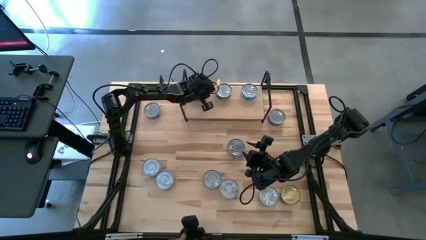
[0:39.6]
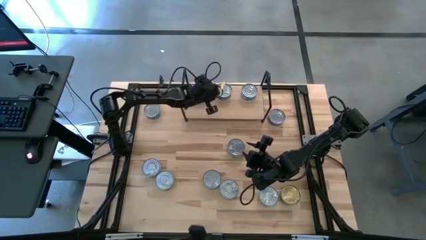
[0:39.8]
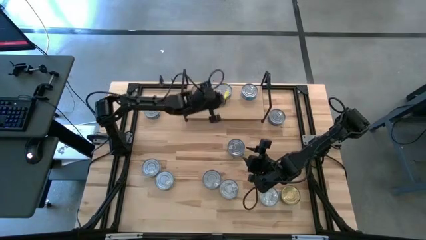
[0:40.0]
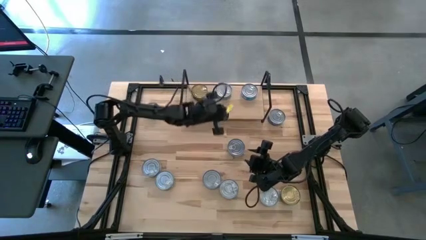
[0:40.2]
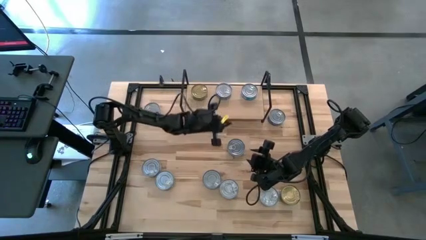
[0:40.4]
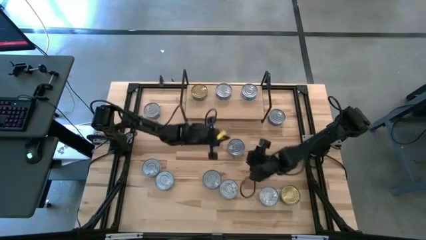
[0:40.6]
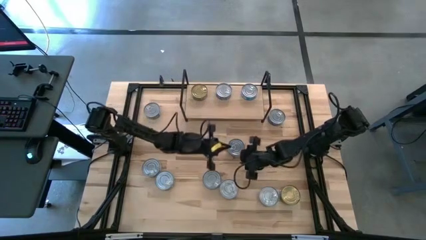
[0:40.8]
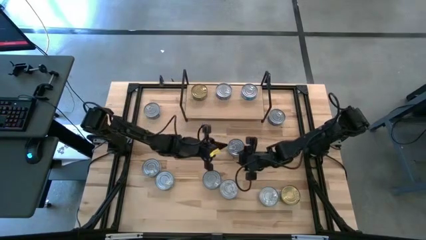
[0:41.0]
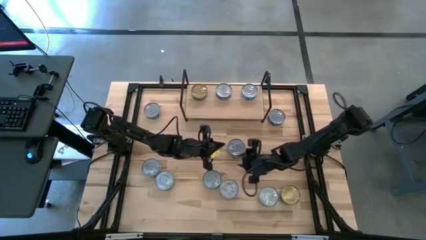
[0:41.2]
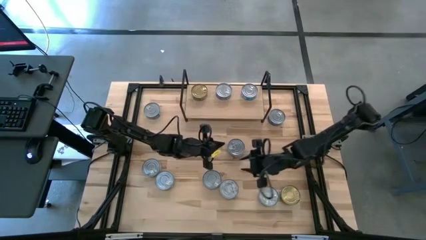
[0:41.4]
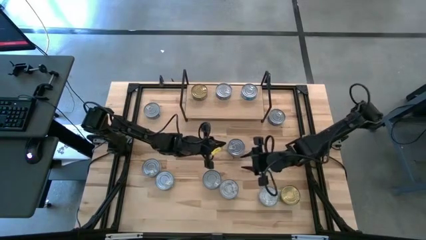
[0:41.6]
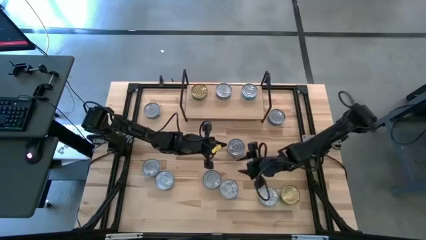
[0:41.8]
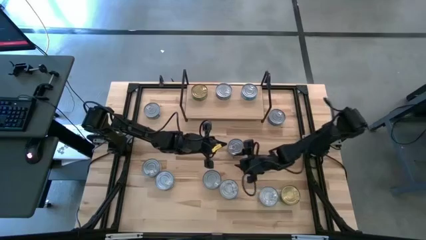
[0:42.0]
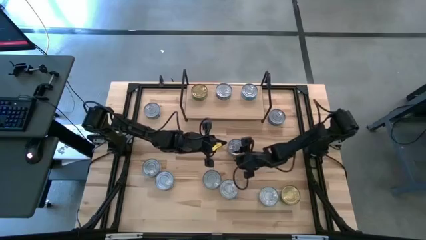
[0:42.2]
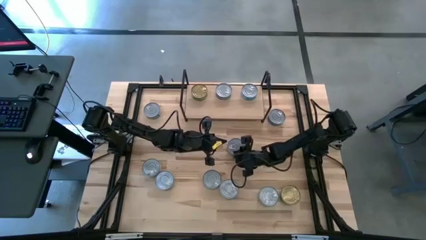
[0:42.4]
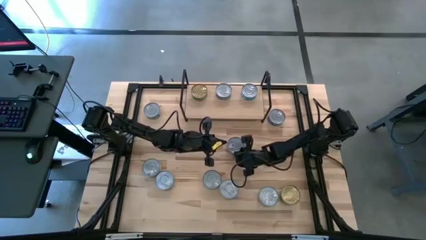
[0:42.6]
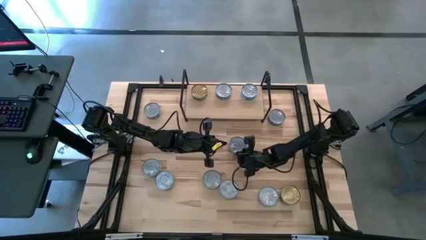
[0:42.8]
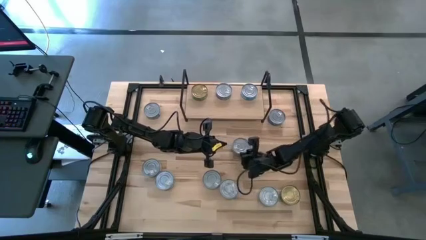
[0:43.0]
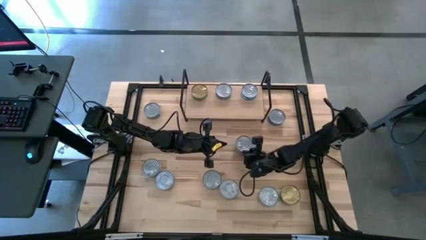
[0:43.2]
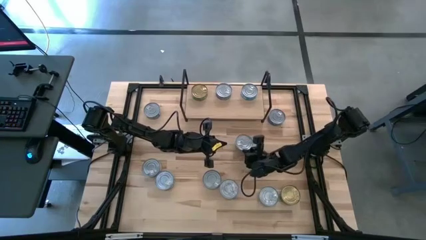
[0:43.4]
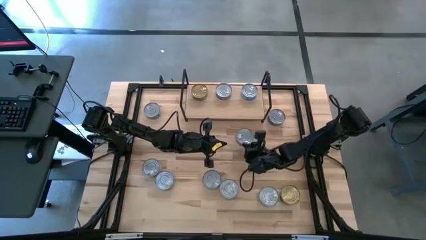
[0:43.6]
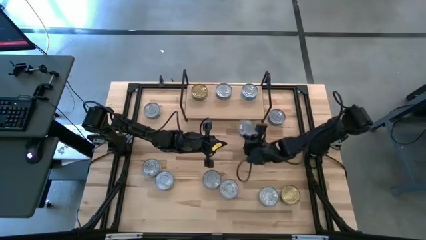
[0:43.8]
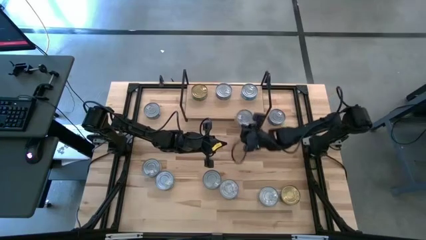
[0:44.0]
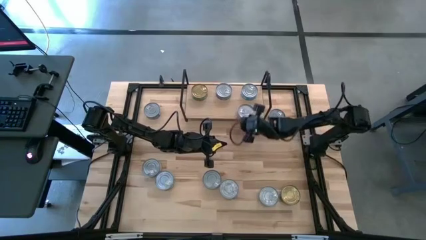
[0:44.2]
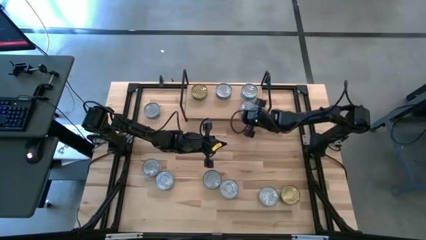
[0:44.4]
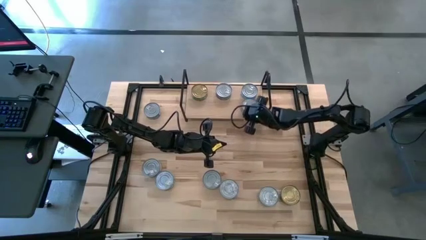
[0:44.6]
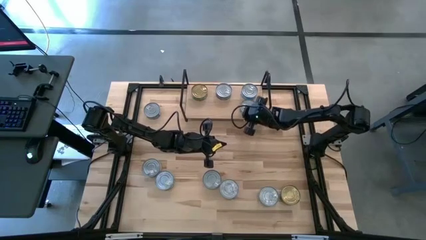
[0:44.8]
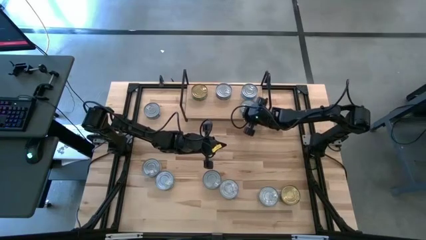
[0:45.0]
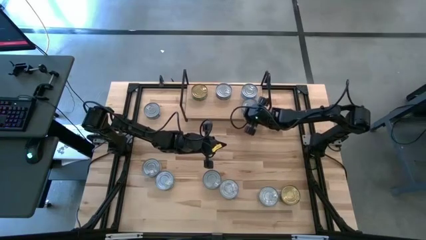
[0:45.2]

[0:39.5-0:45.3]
Task: Stack canned seafood by type on shelf
Put the yellow-blue tuna can on the shelf

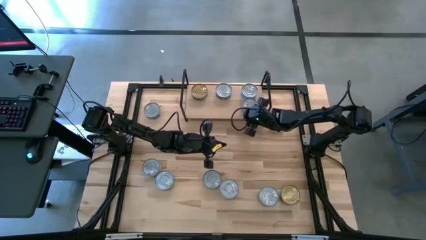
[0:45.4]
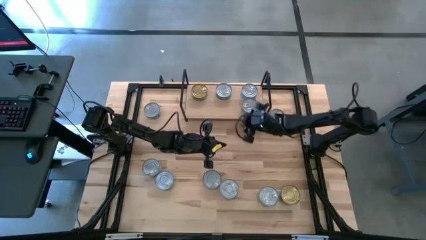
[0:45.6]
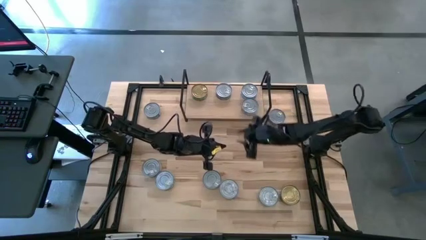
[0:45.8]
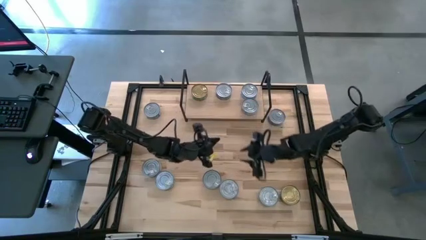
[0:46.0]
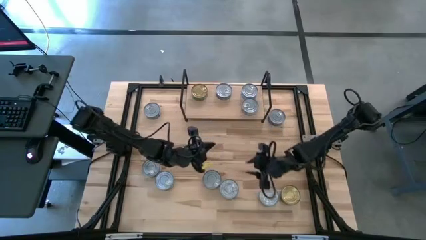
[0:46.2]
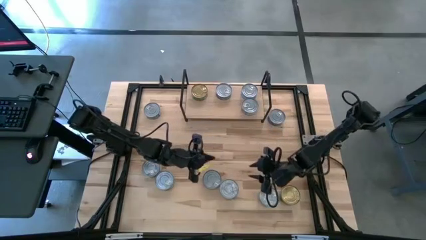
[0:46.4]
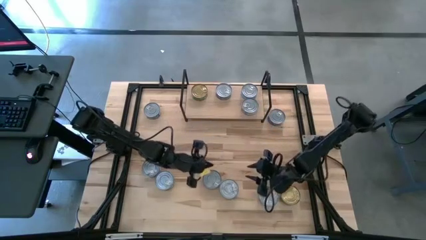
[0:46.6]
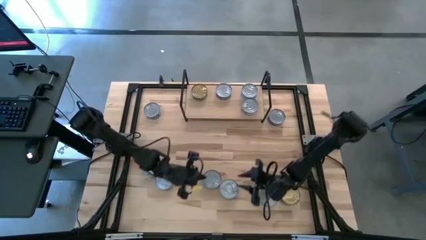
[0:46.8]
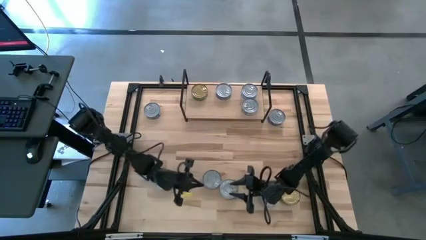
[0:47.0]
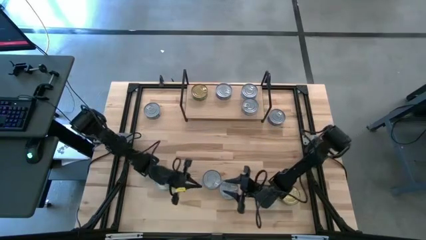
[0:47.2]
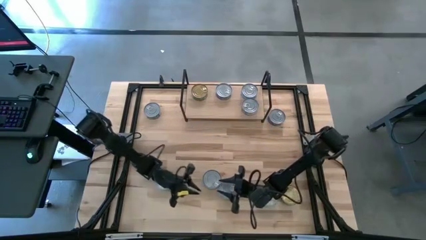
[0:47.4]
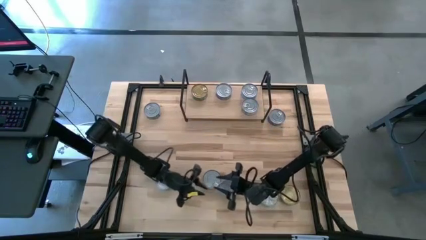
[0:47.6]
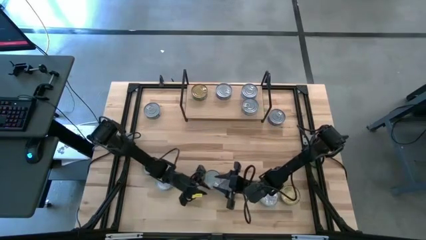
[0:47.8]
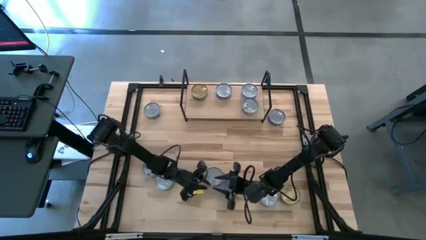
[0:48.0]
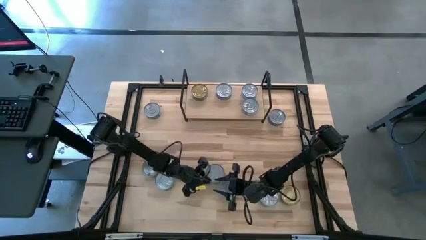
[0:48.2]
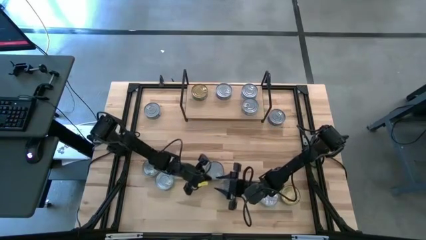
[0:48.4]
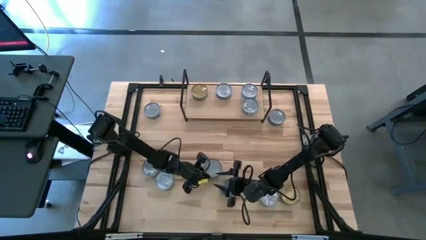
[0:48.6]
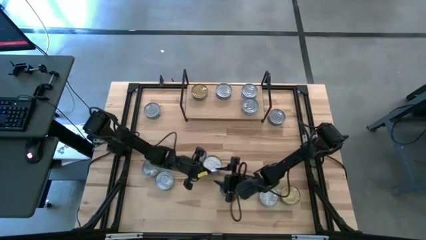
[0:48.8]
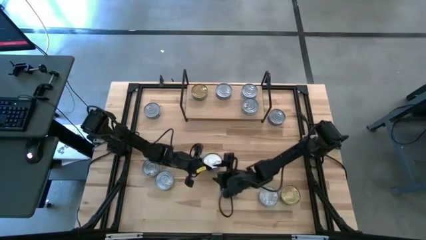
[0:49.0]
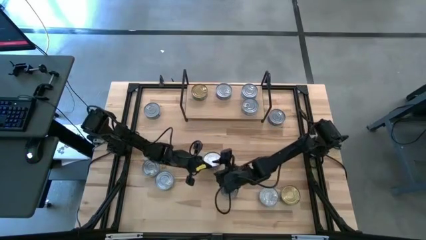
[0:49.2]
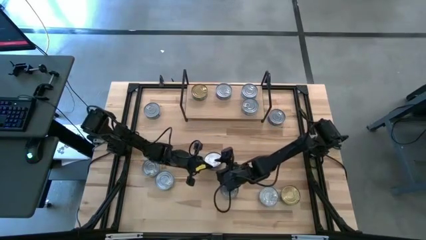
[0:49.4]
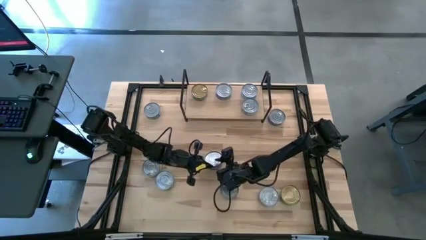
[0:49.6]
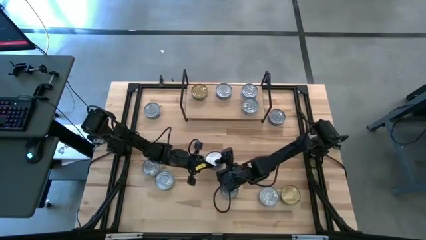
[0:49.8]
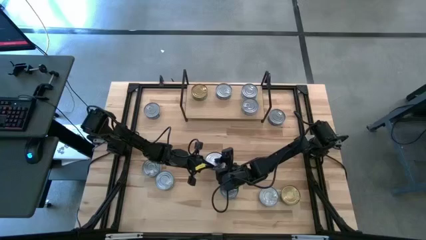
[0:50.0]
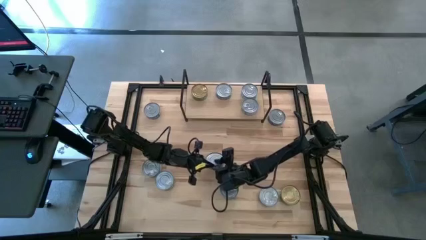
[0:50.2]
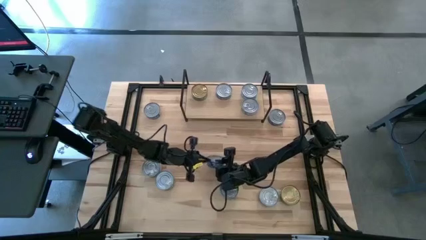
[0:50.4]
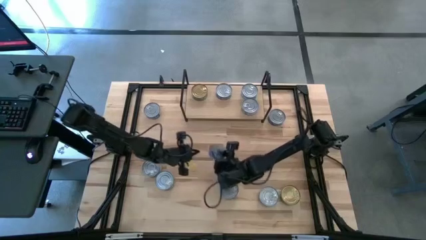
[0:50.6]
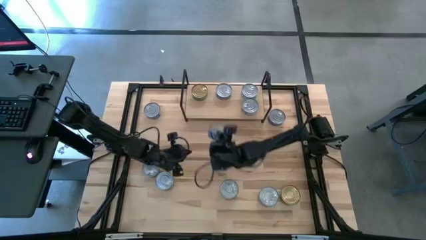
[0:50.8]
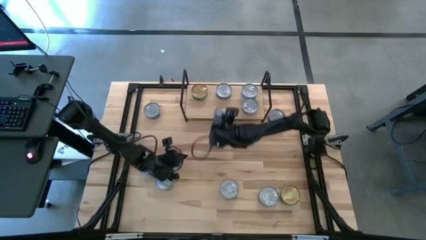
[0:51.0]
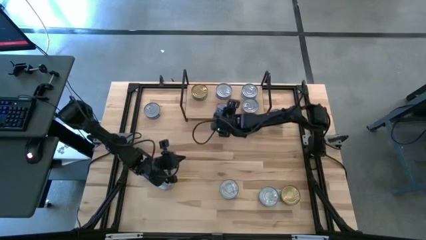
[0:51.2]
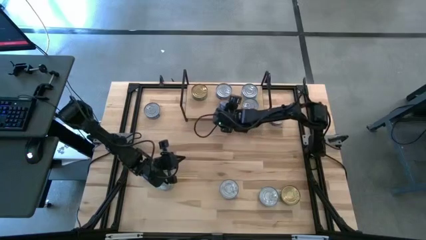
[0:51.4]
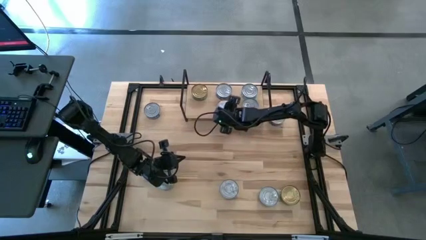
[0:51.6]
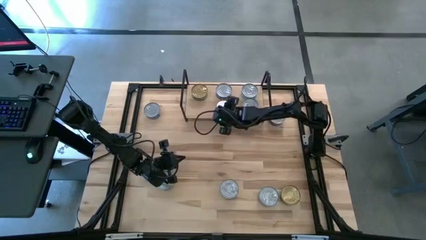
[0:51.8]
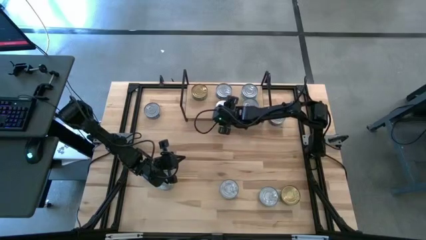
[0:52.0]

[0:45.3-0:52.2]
Put the blue tuna can on the shelf

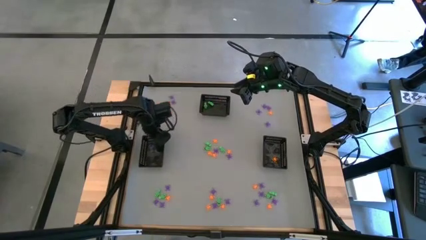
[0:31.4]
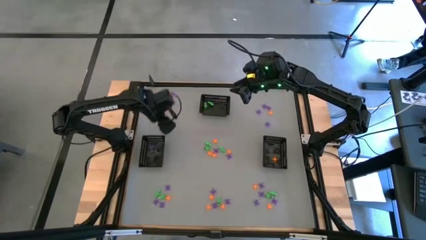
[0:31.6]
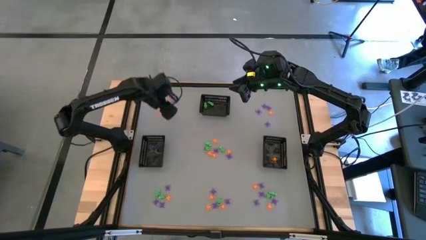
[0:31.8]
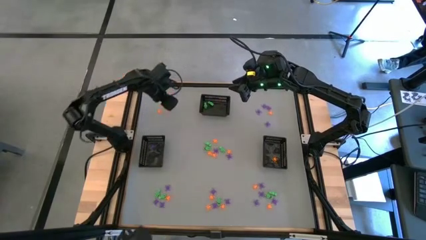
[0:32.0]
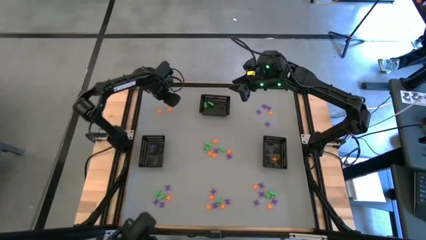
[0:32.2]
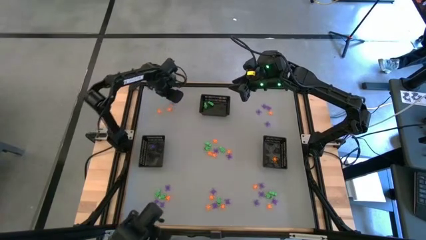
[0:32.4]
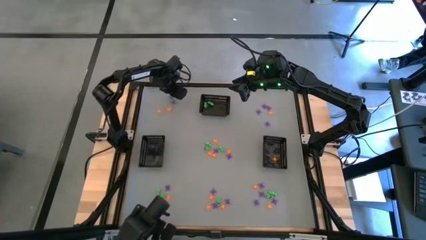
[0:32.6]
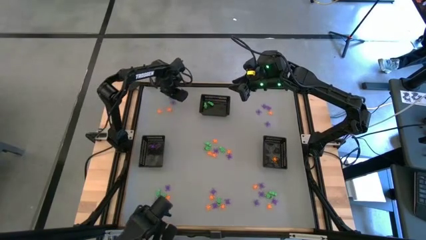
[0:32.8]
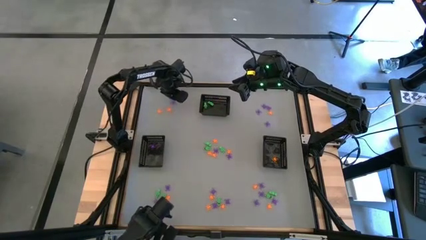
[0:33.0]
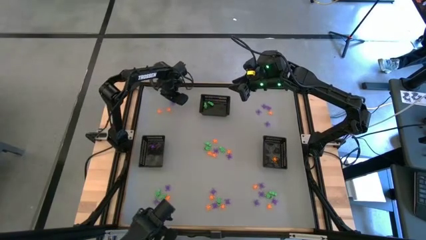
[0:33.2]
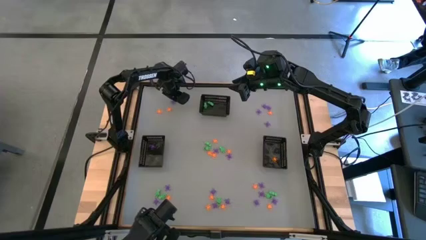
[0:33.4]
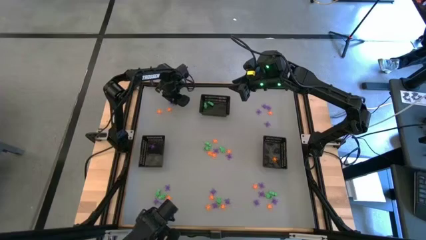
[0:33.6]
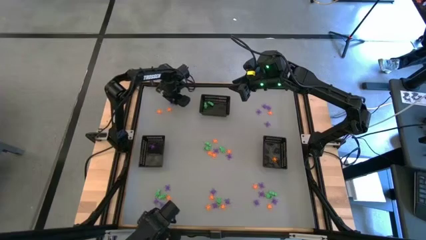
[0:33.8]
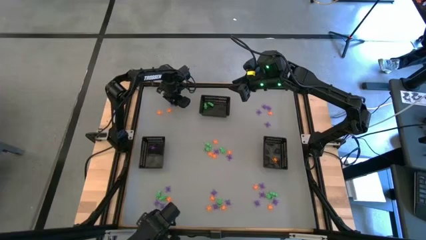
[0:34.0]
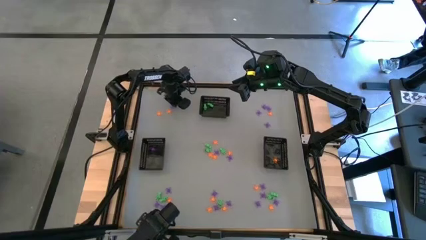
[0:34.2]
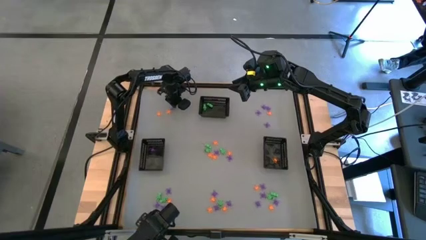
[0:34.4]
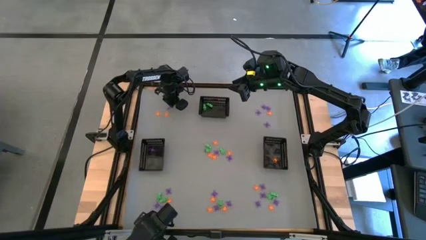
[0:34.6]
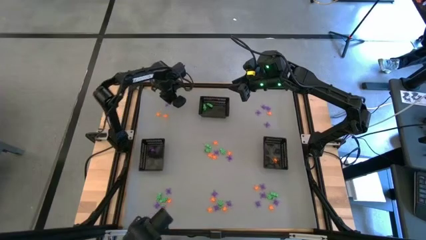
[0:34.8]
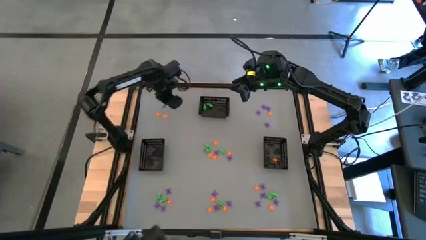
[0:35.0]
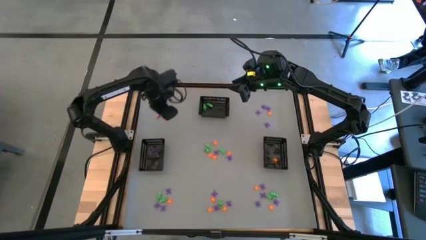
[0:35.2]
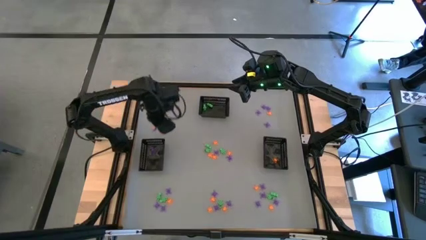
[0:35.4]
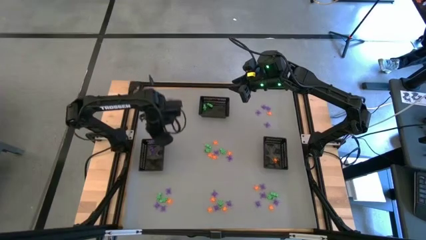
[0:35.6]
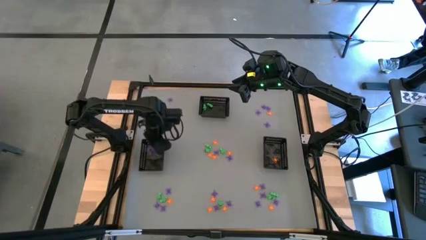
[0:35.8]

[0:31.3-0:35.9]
Task: Sort Halloween decoration
Put the violet spider toy into the left bin
